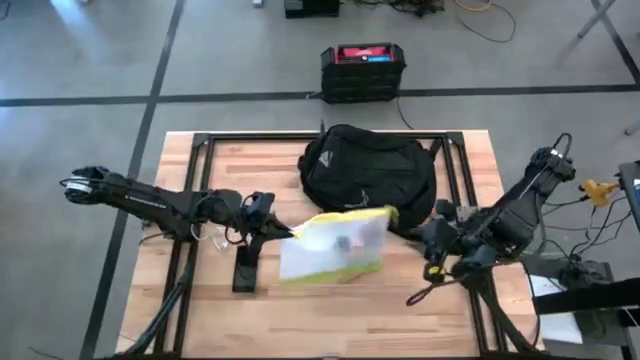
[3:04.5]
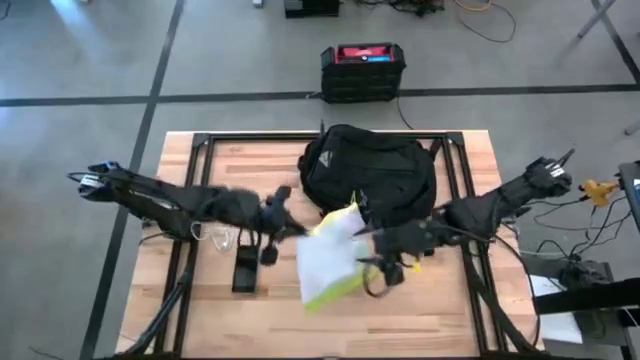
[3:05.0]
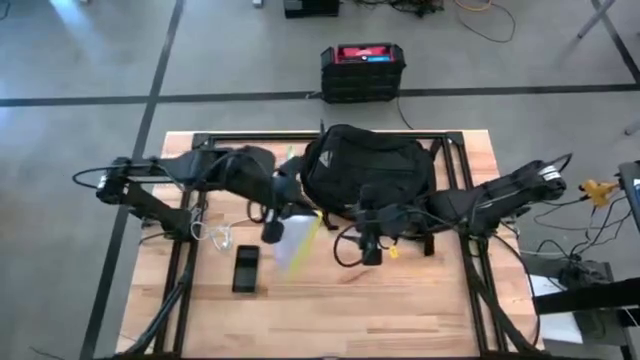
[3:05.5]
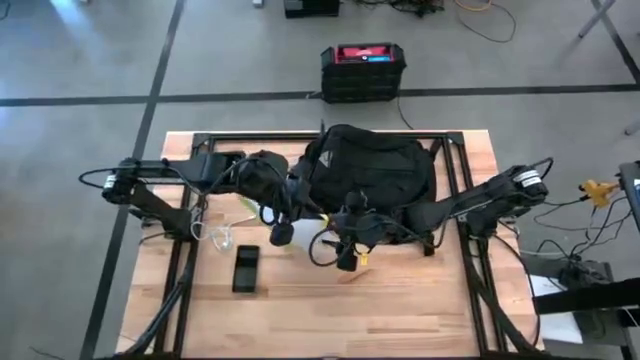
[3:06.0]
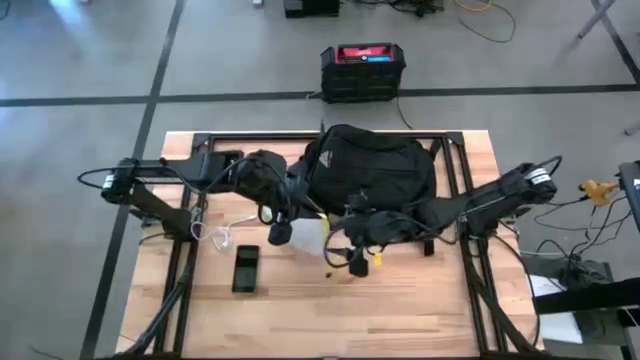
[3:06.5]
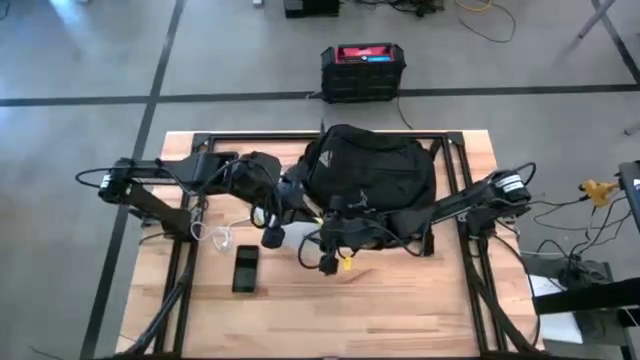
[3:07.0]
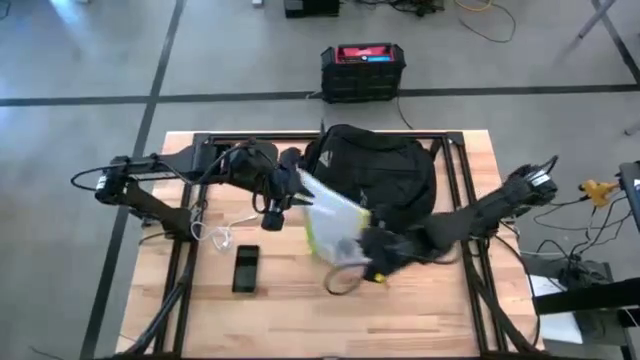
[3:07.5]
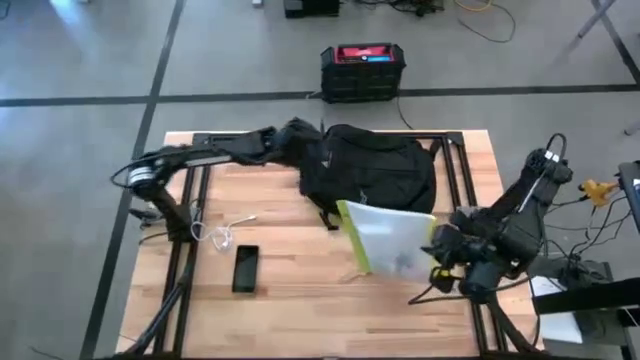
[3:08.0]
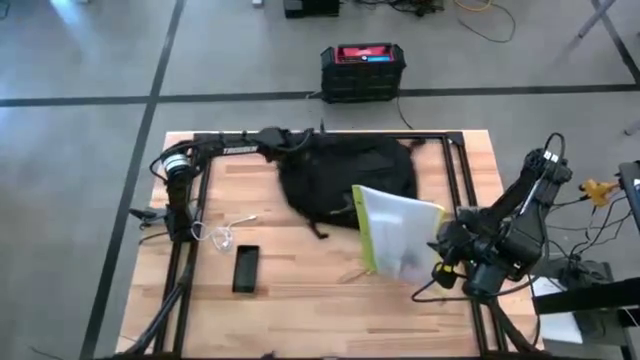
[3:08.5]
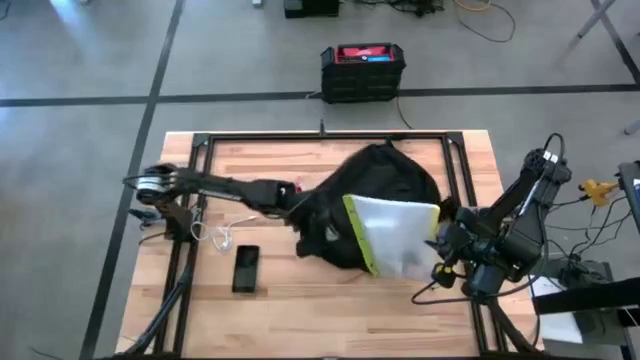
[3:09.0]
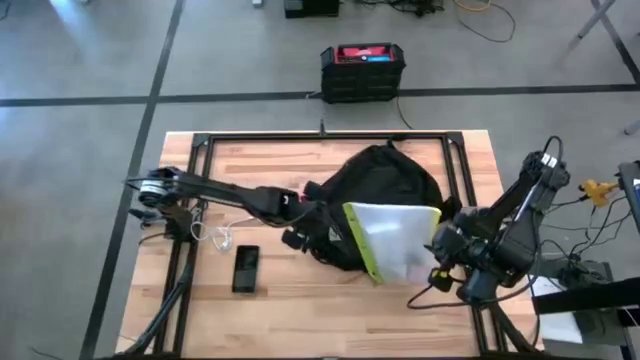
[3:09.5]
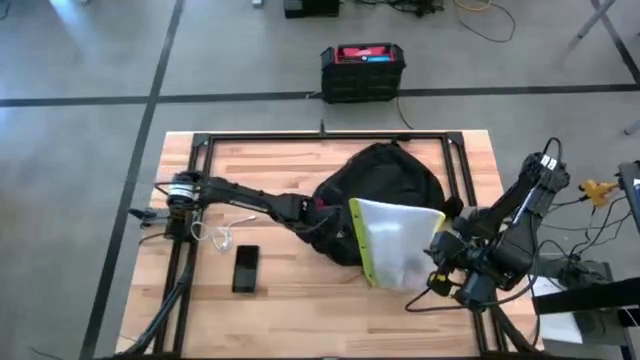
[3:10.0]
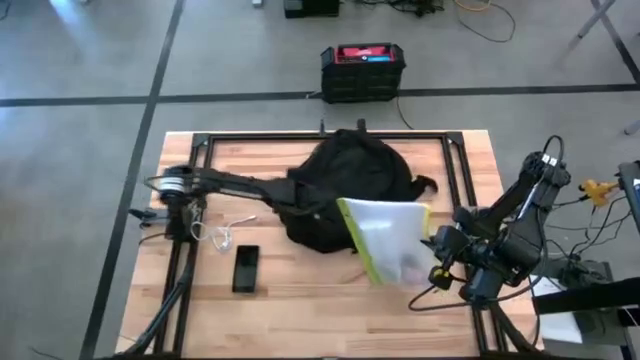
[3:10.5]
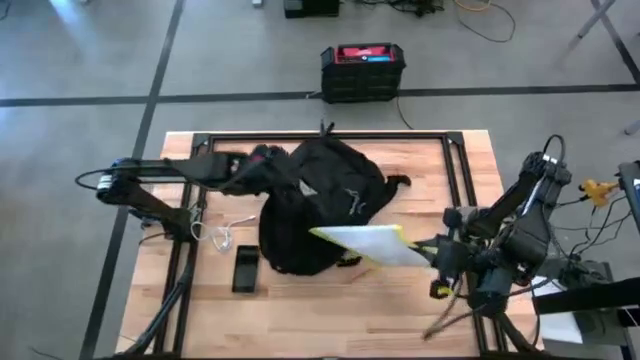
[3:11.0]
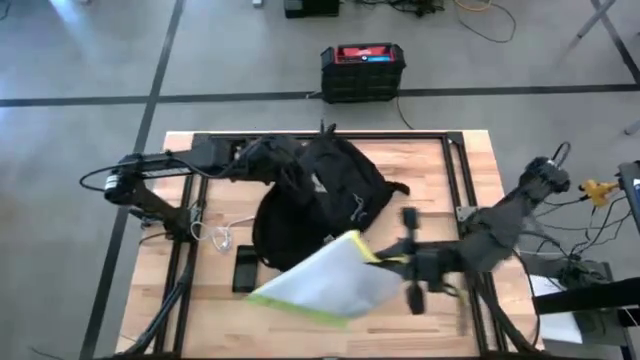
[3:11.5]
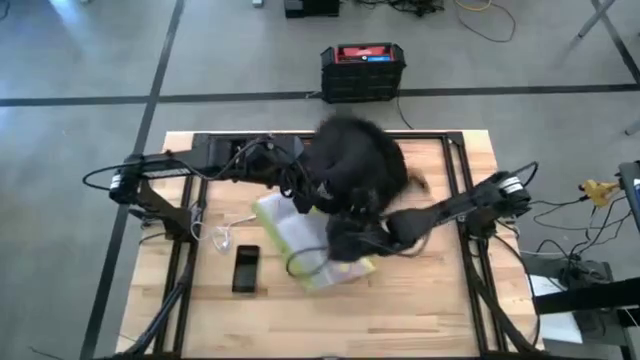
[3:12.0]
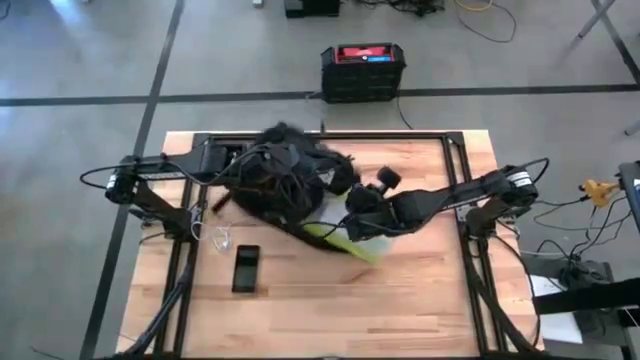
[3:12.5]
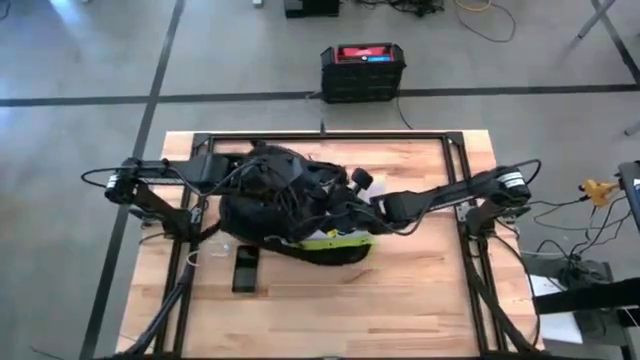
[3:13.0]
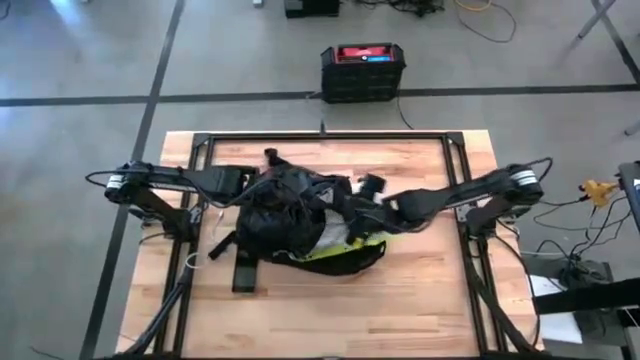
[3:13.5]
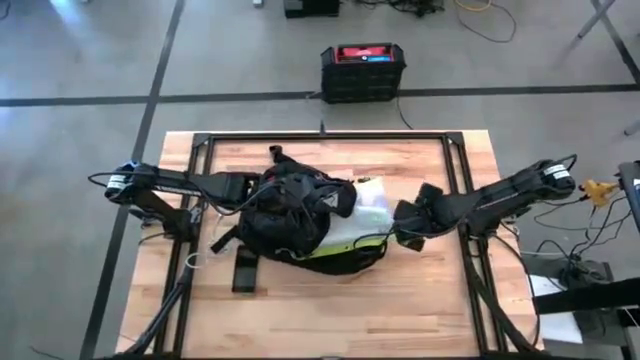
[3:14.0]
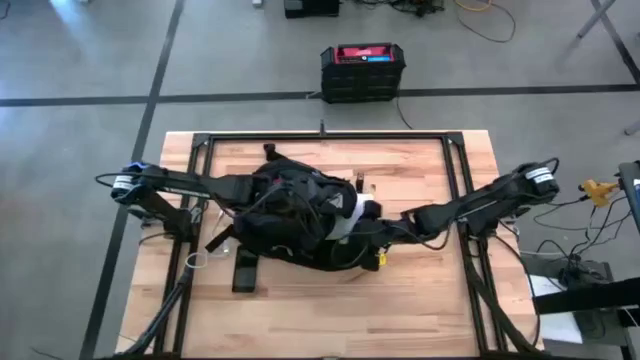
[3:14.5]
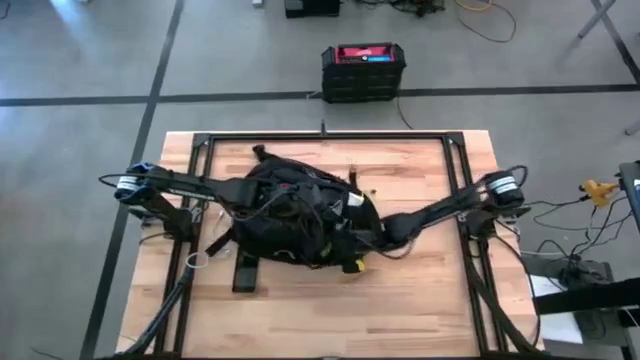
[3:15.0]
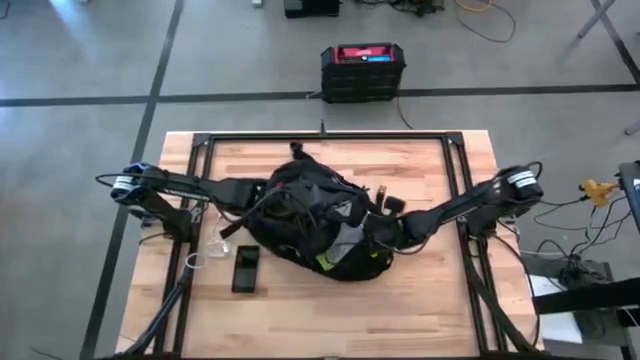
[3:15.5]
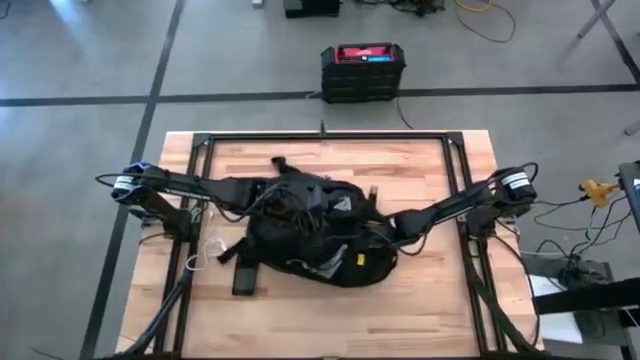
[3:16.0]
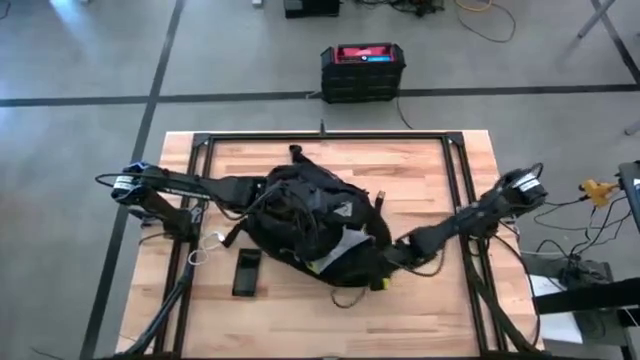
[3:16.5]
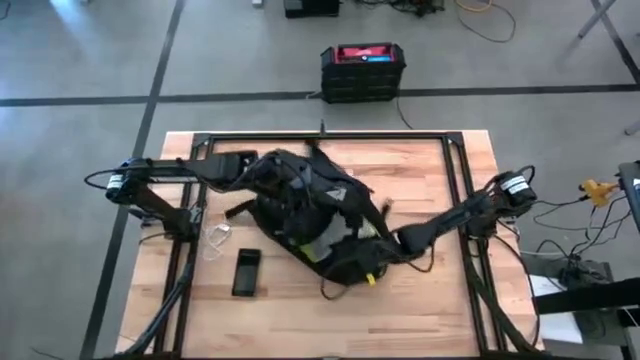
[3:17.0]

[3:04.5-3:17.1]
Task: Unpack backpack
Put the yellow green zip bag into the black backpack

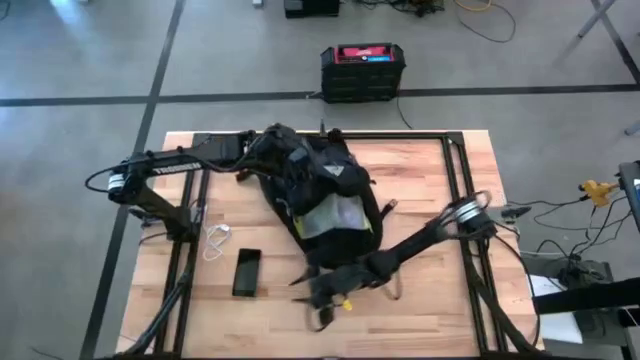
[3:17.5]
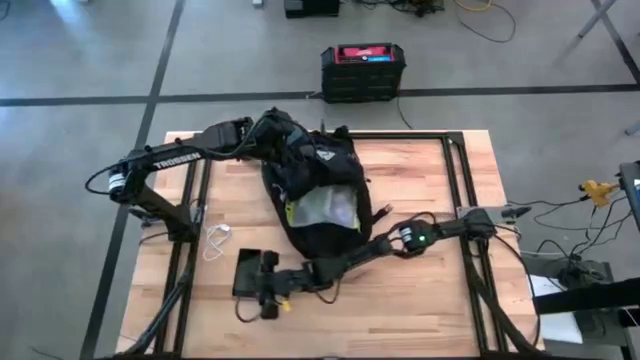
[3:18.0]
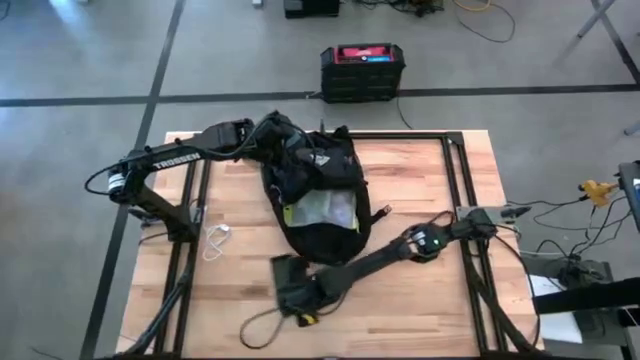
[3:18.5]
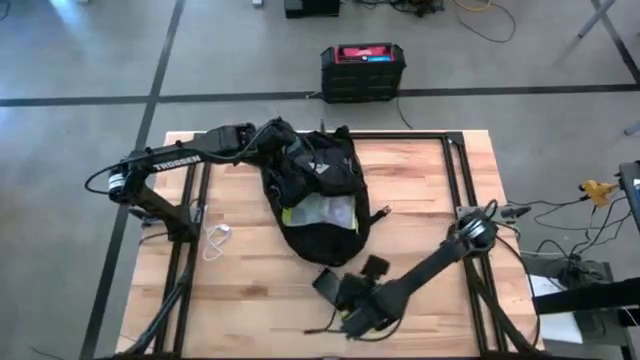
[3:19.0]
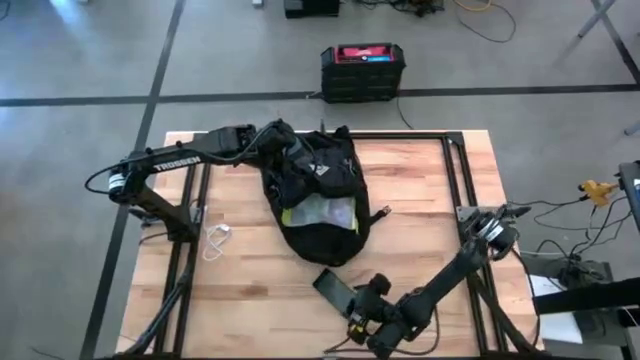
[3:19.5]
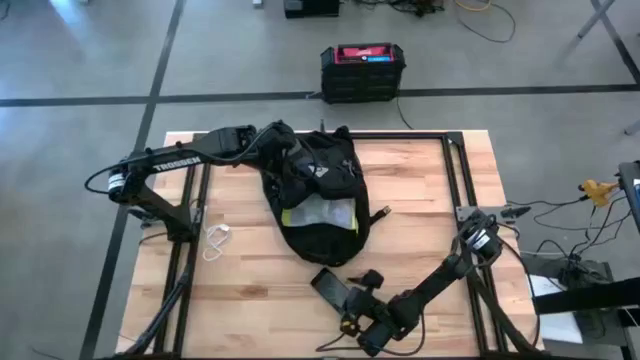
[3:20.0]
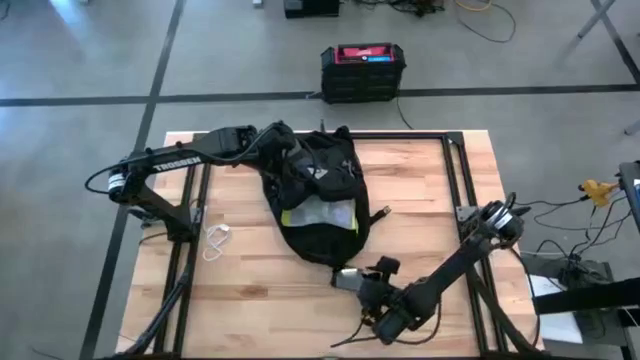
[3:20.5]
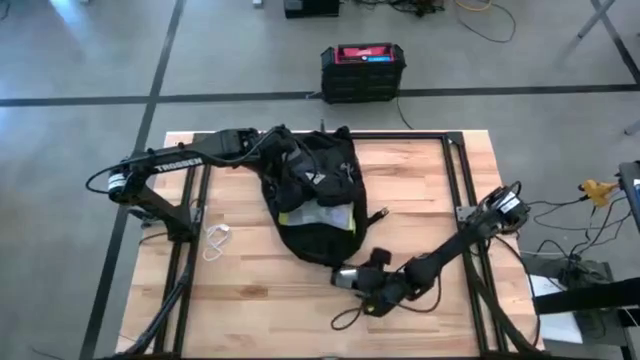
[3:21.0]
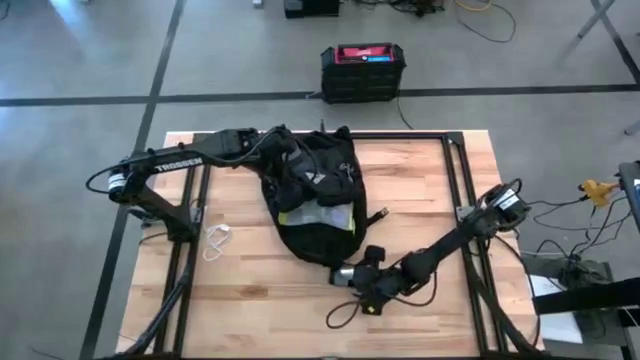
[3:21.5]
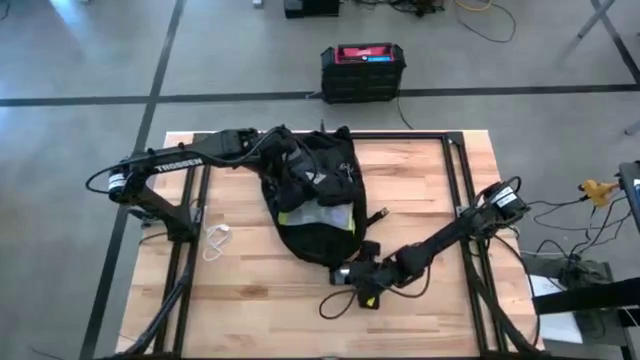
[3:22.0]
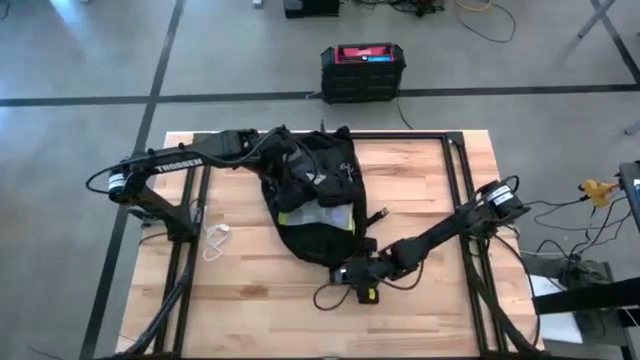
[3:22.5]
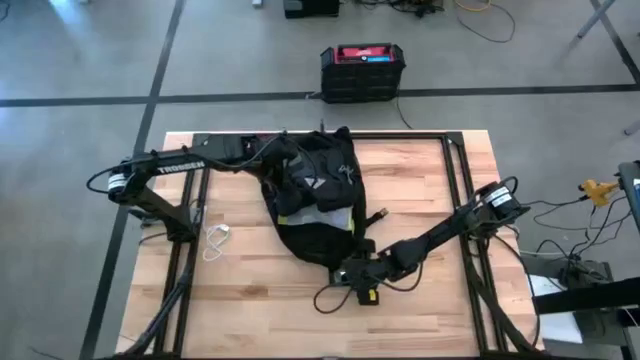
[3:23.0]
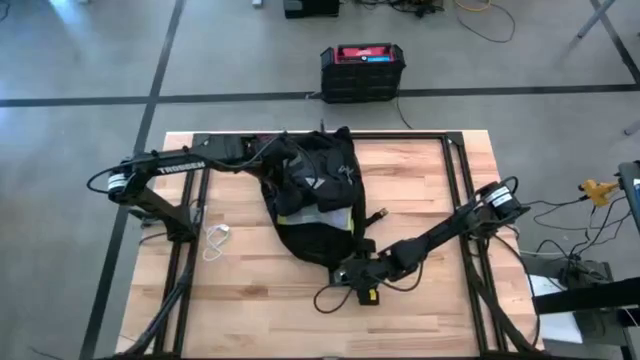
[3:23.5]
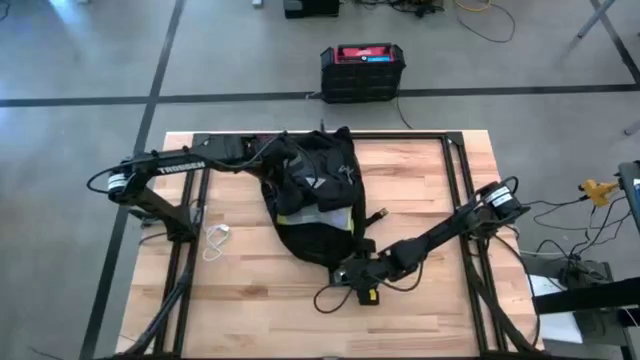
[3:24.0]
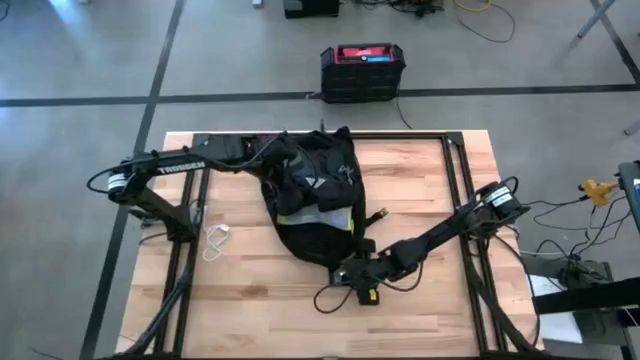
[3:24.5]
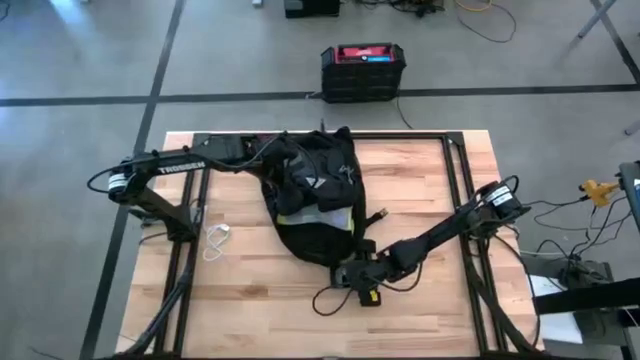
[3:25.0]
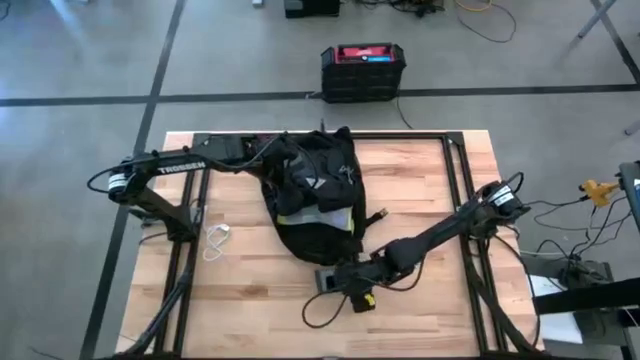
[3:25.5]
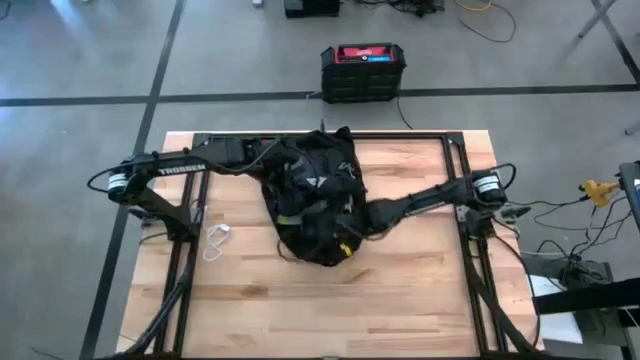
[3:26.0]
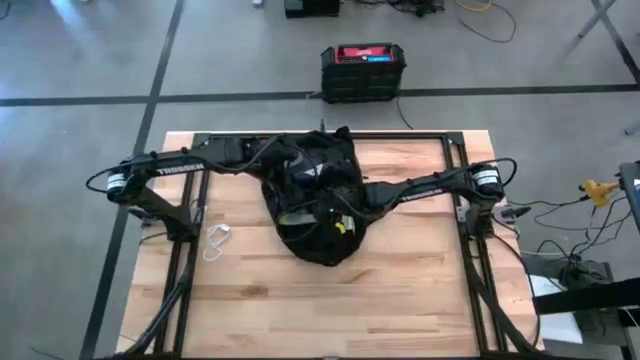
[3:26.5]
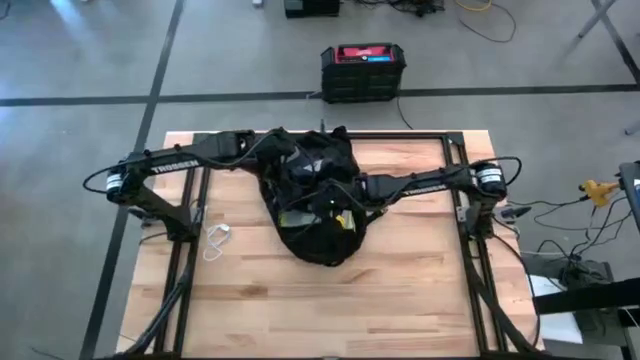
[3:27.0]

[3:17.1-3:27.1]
Put the black phone into the black backpack
